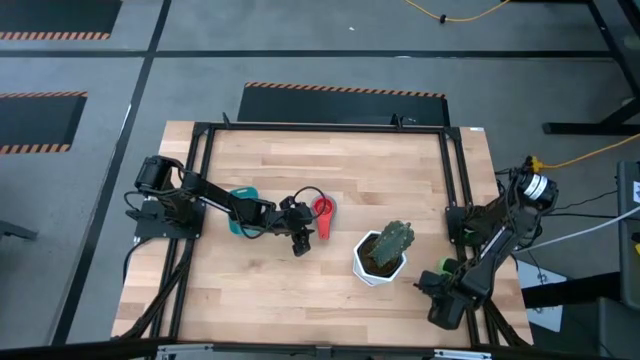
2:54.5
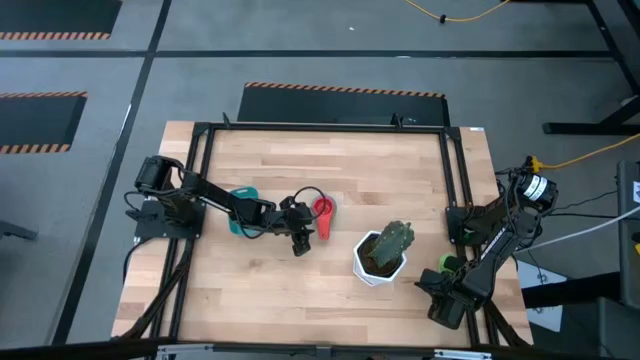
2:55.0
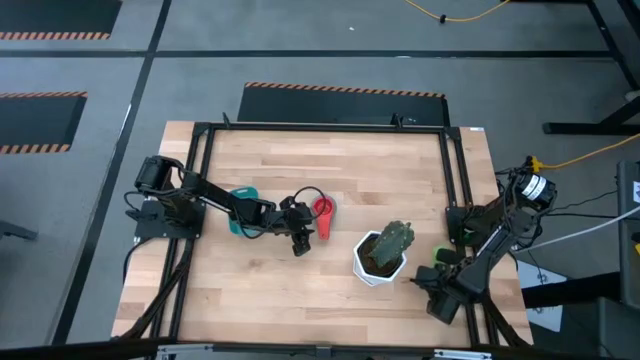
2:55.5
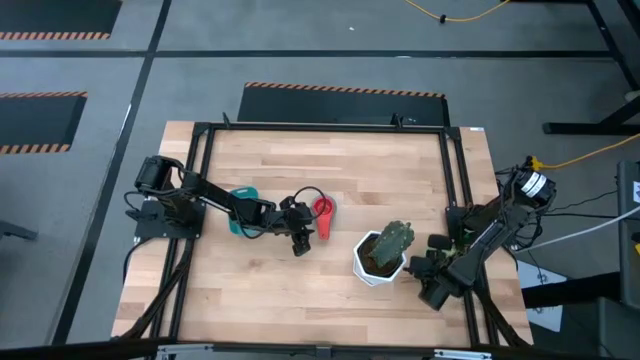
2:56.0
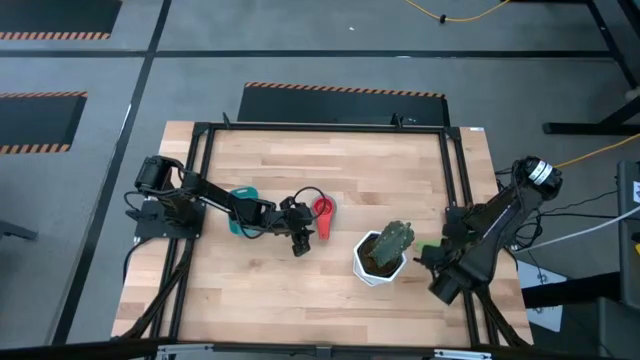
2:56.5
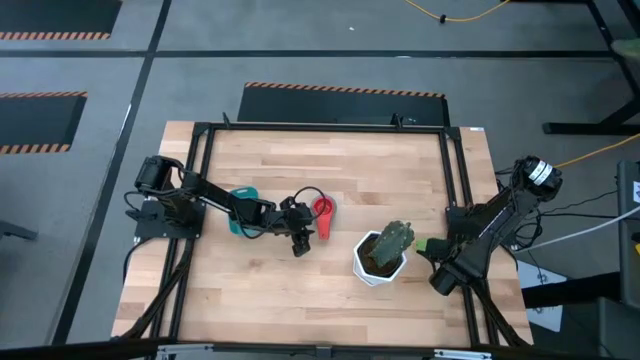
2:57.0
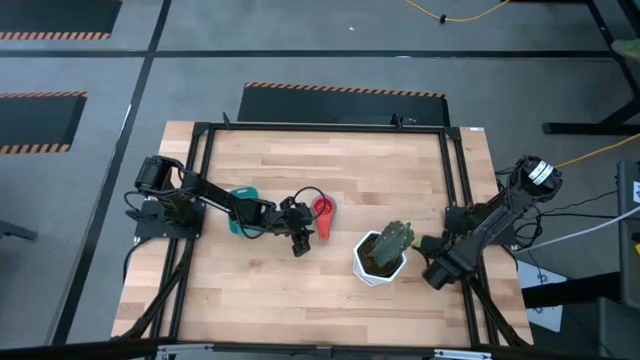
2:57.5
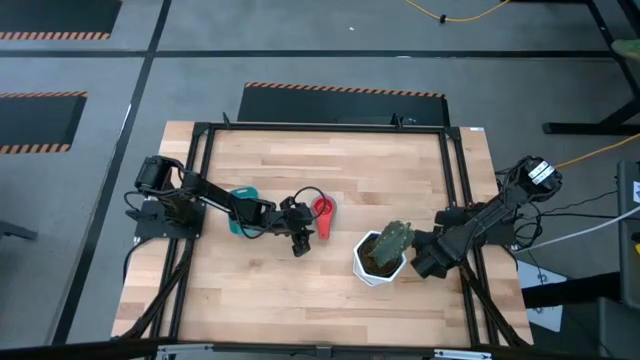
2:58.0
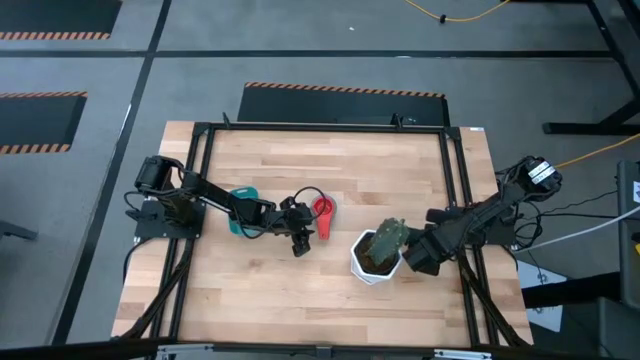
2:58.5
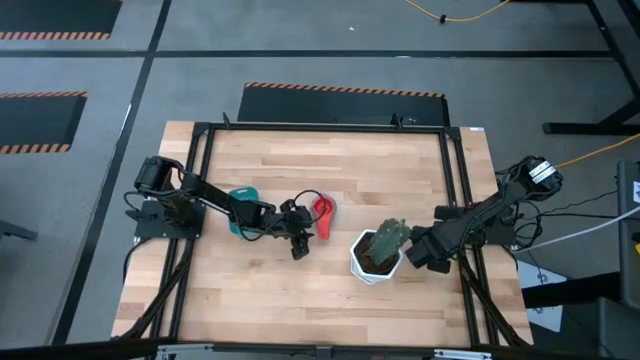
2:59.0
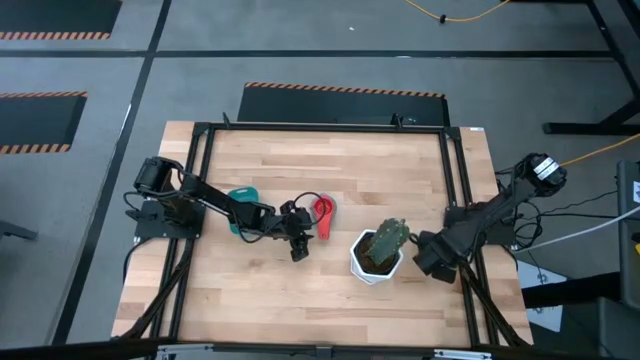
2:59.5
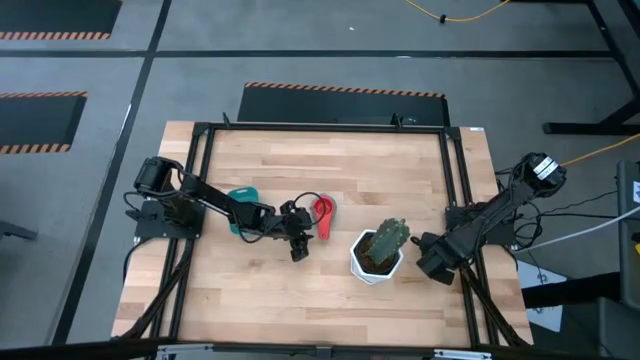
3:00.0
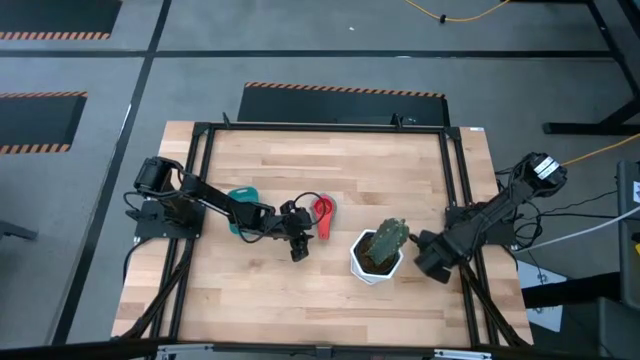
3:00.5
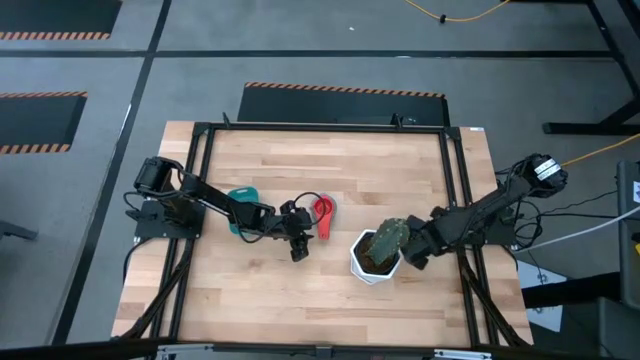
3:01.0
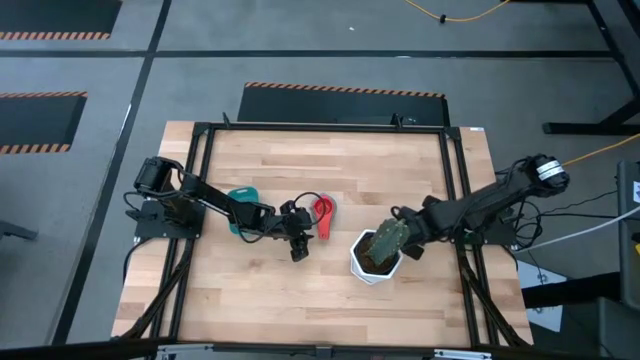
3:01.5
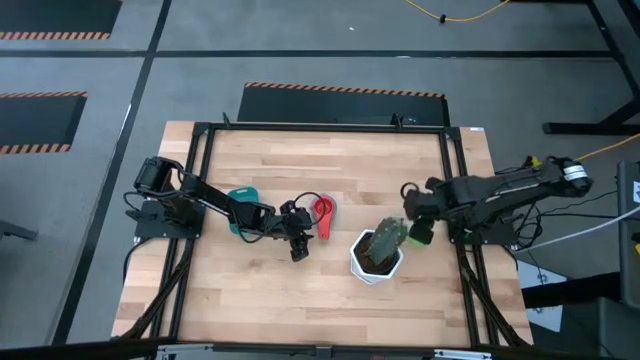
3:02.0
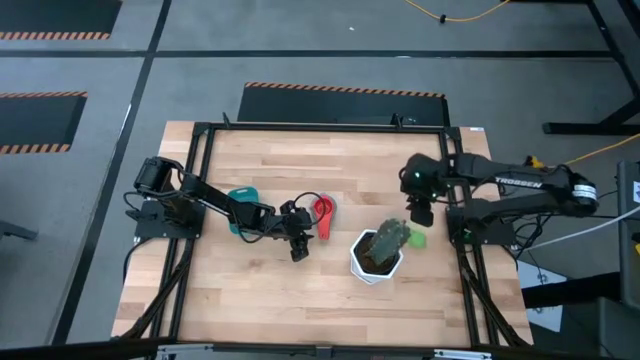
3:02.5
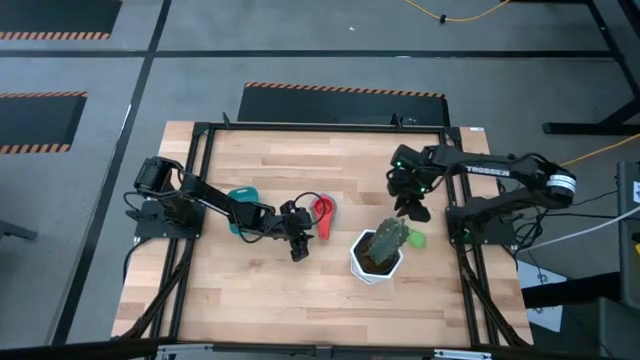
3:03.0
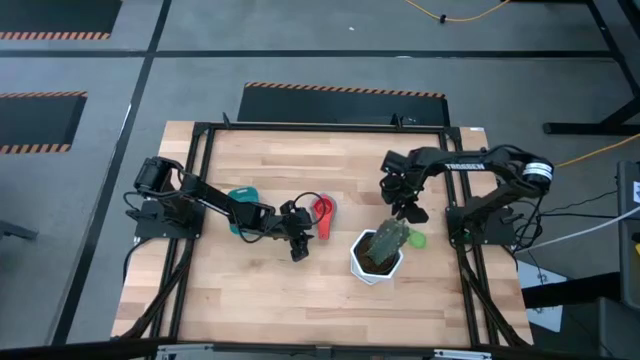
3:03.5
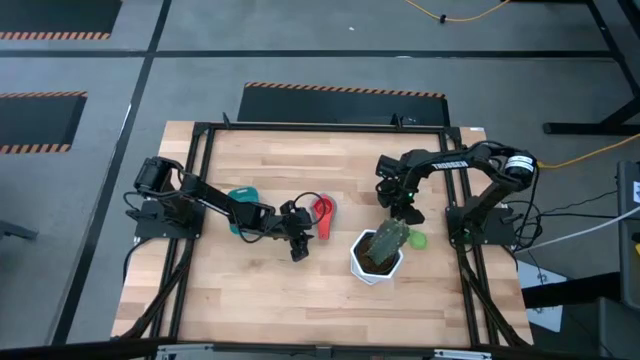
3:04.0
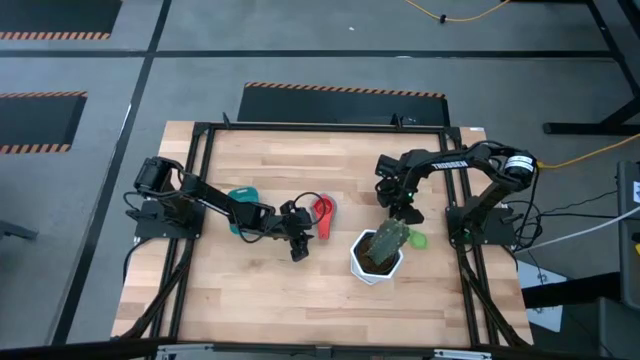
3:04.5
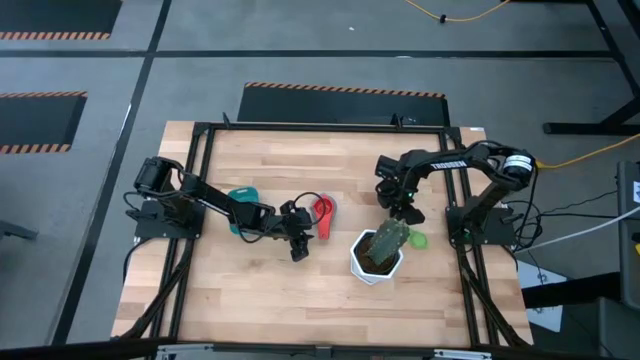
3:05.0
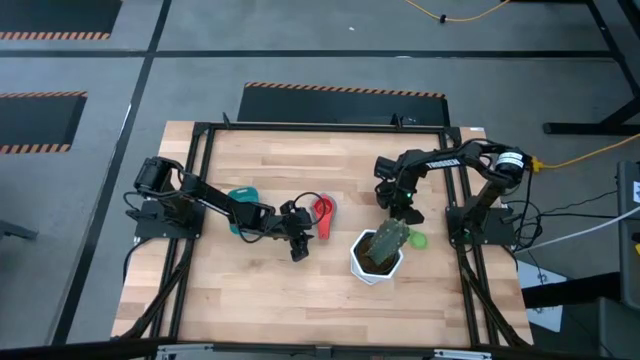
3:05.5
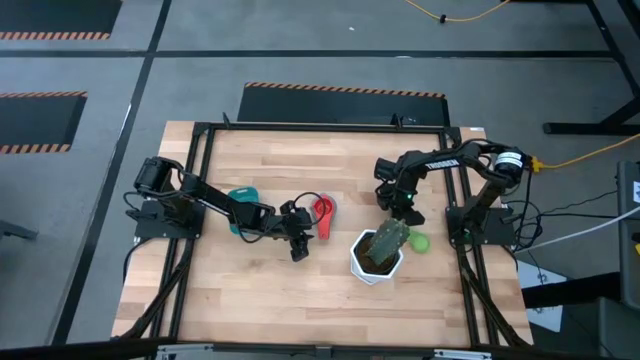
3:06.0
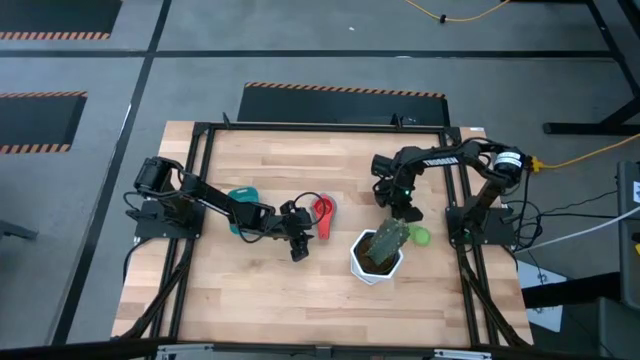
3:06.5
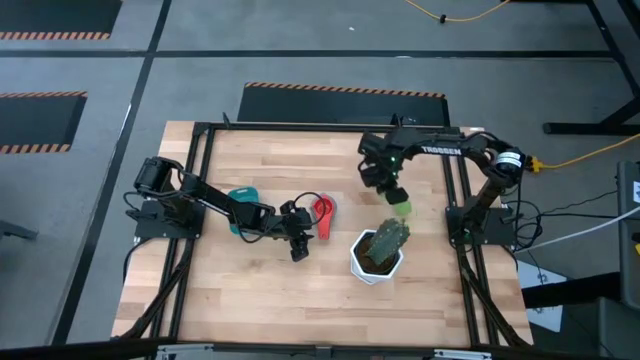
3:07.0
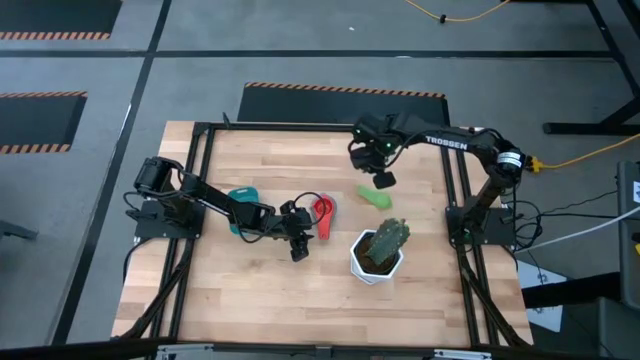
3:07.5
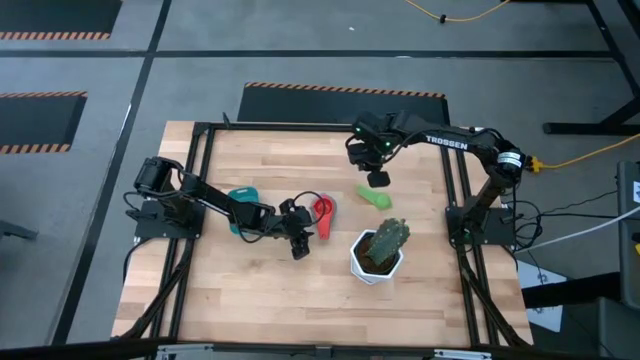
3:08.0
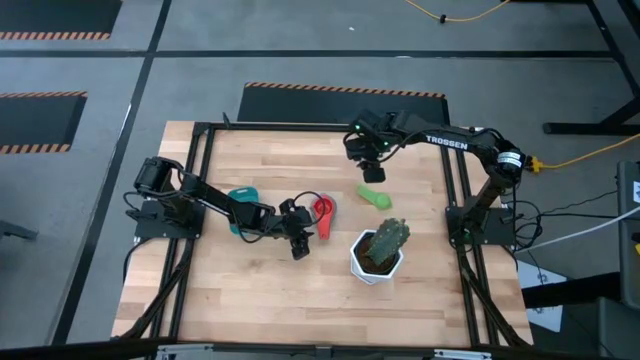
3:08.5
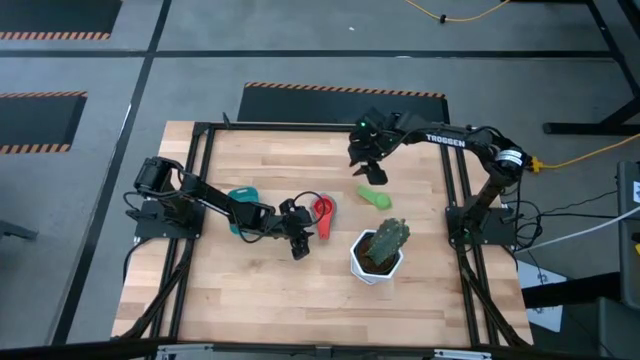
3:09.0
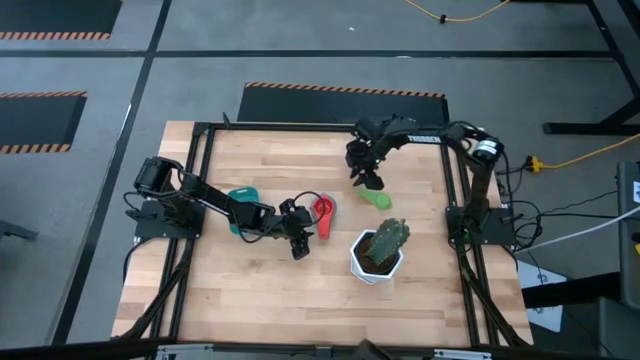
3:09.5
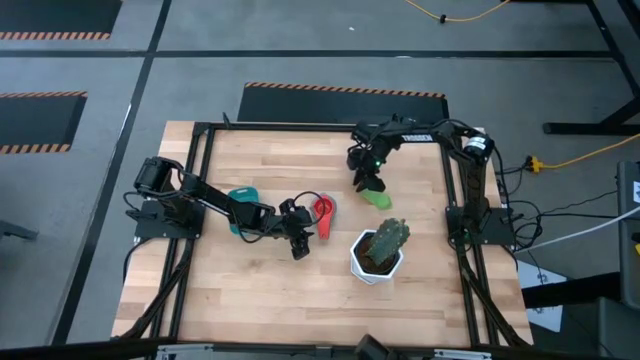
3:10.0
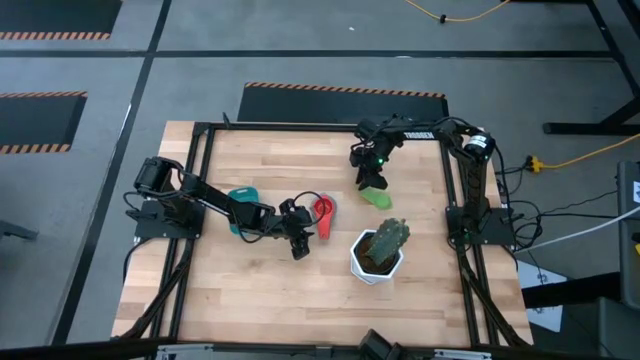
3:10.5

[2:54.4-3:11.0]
Task: Nest measuring cups in basket
Stack the green measuring cup on top of the red measuring cup

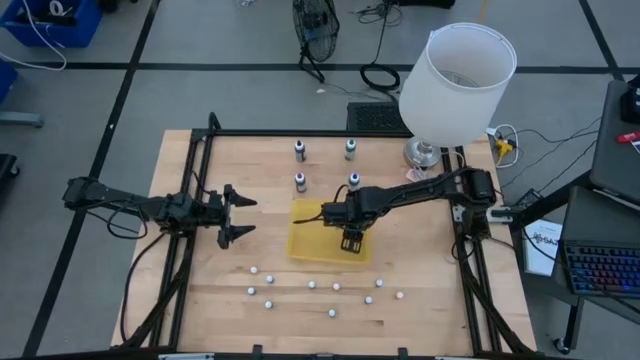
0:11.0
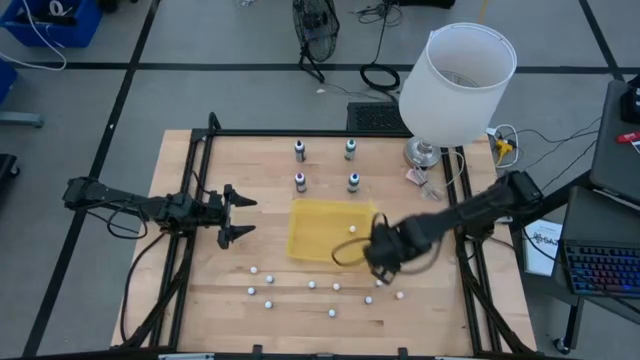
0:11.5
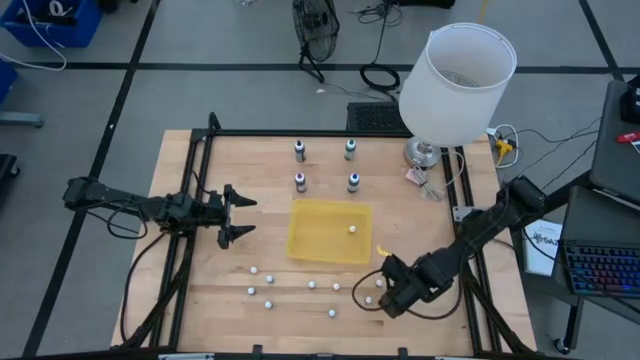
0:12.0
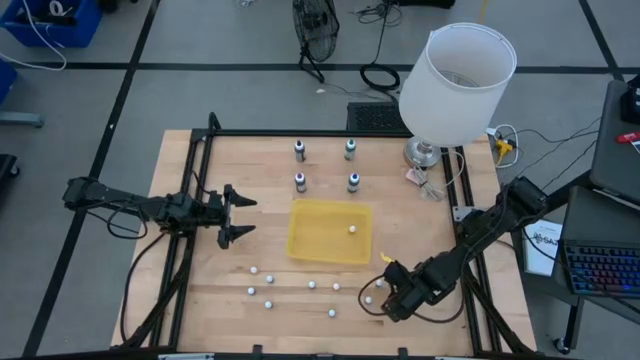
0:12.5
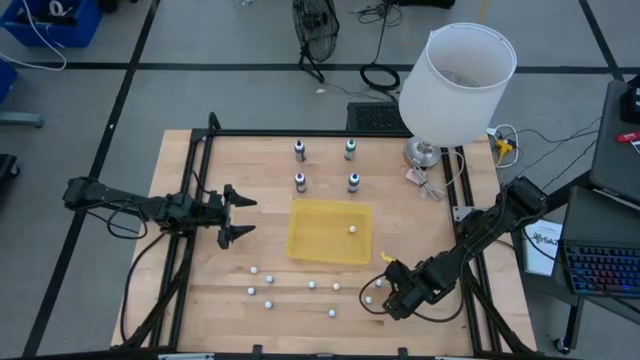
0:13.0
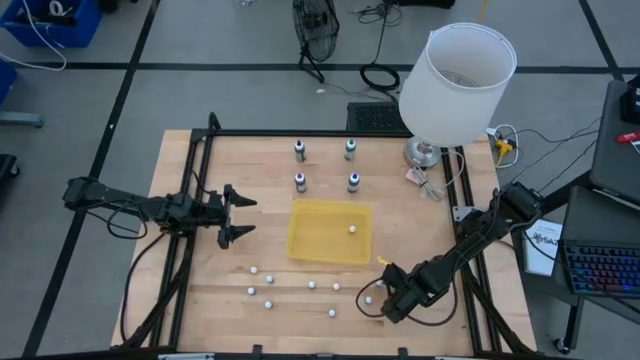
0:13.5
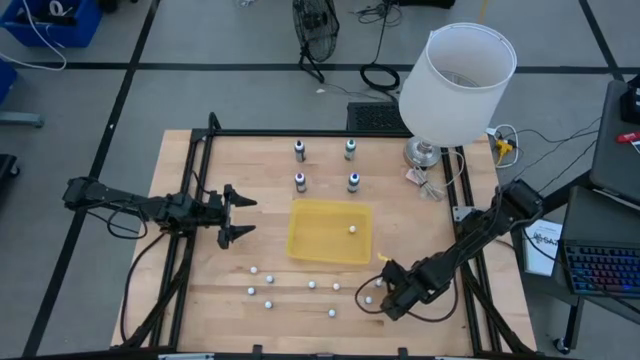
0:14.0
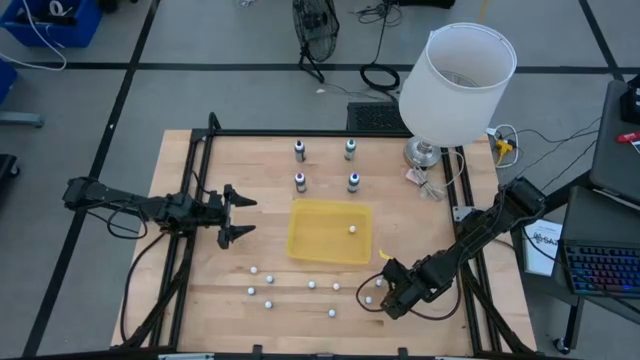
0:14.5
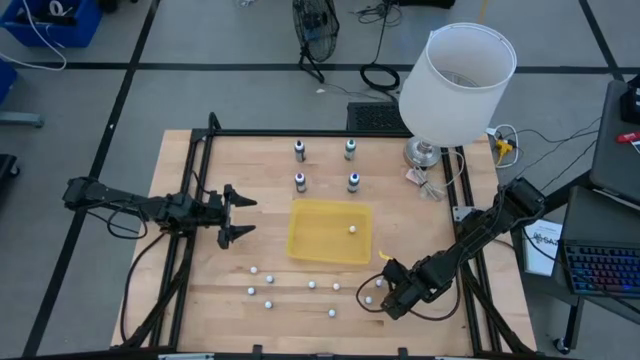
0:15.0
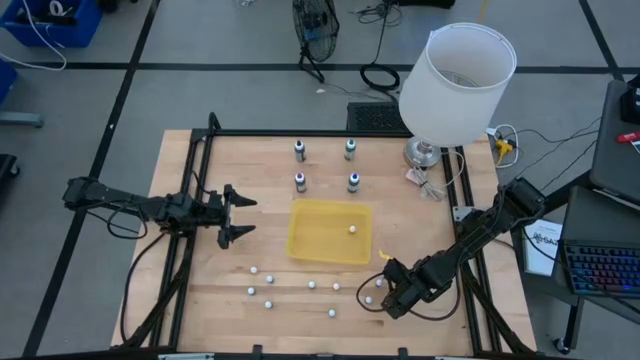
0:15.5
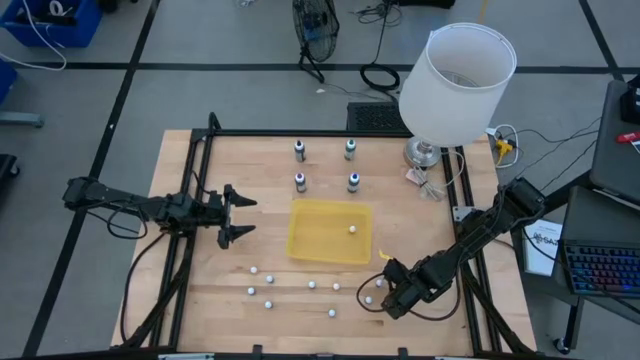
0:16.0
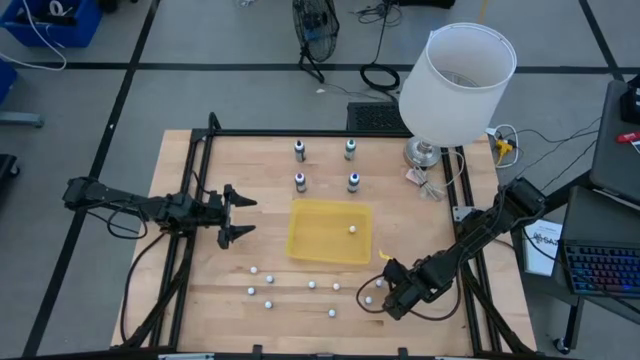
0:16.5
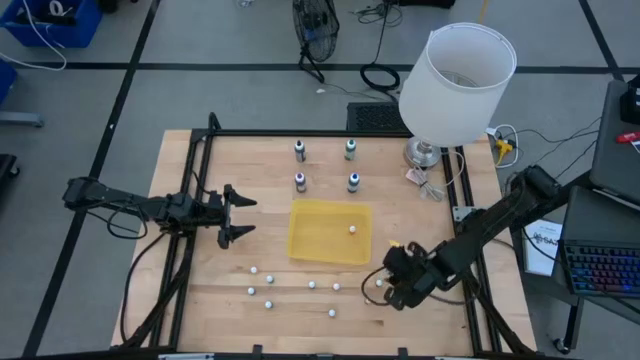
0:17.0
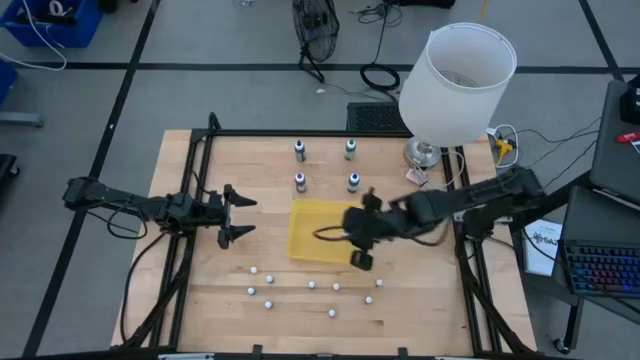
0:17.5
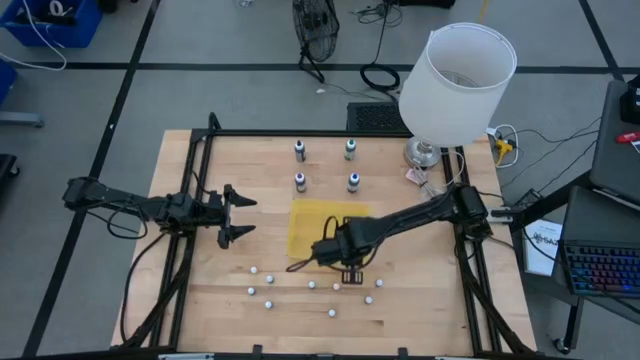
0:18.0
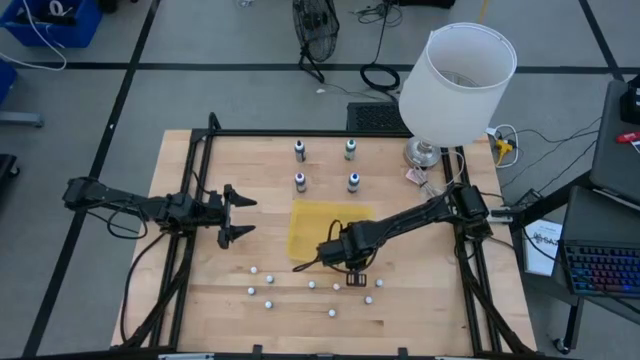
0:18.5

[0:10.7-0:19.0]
Task: Pick & Place food coloring
Put the small yellow food coloring bottle into the yellow container
